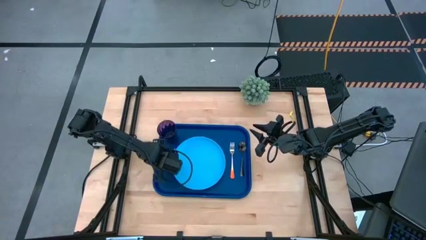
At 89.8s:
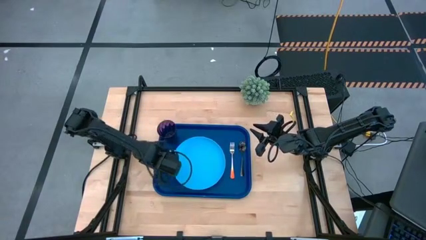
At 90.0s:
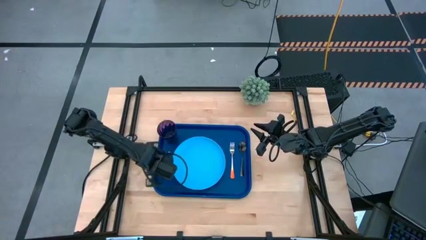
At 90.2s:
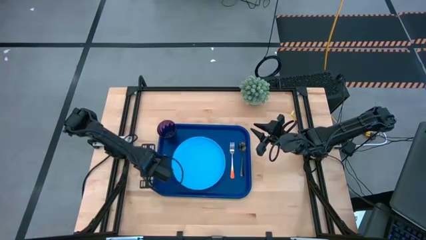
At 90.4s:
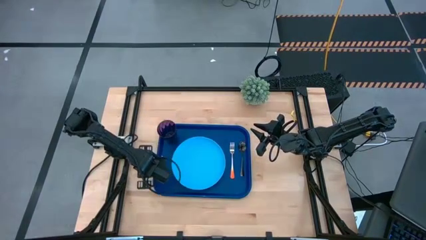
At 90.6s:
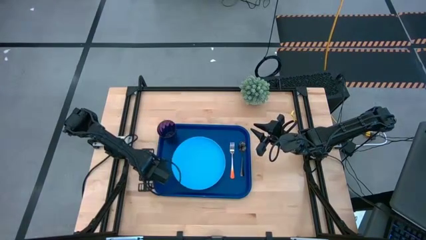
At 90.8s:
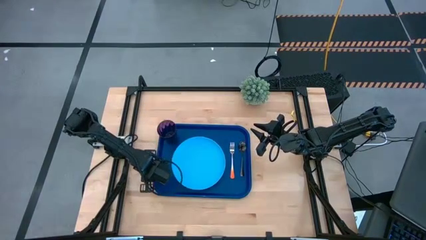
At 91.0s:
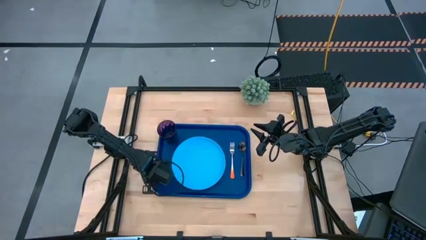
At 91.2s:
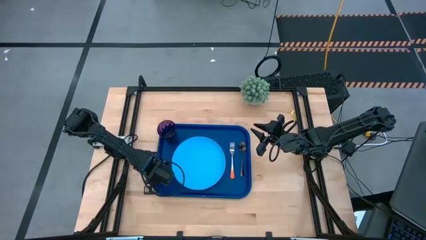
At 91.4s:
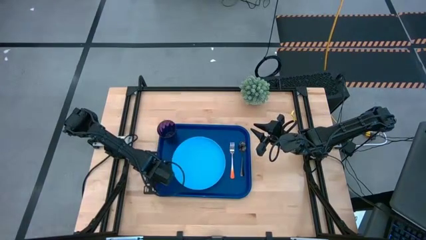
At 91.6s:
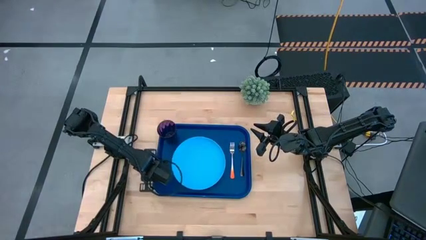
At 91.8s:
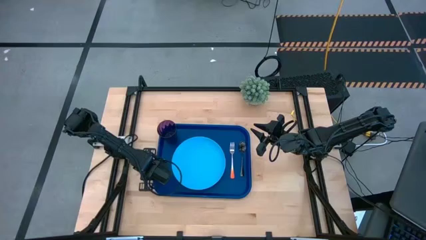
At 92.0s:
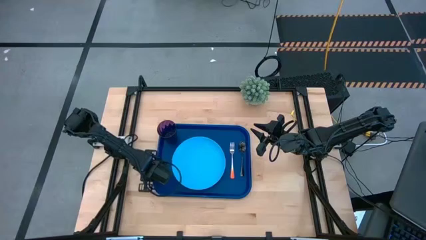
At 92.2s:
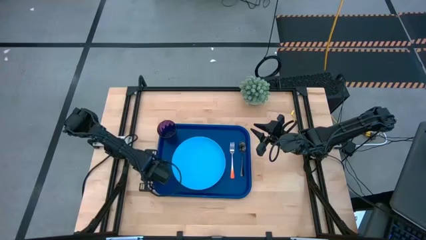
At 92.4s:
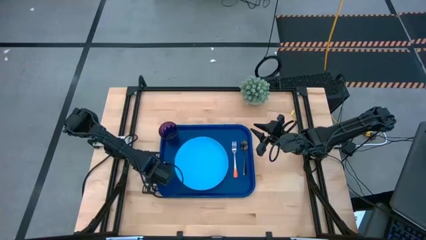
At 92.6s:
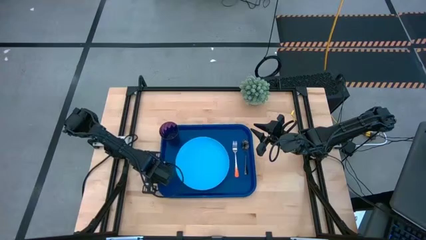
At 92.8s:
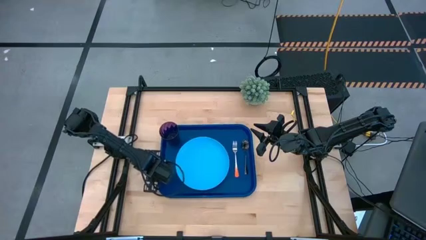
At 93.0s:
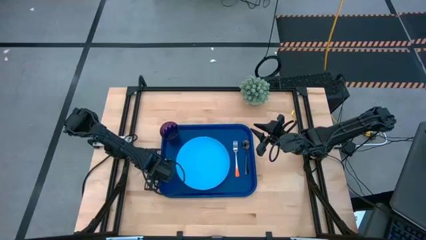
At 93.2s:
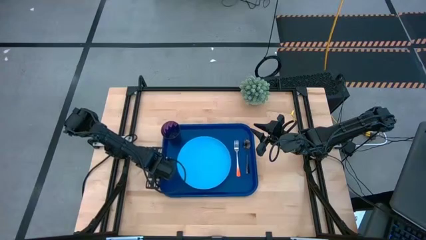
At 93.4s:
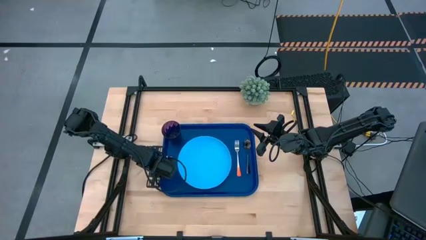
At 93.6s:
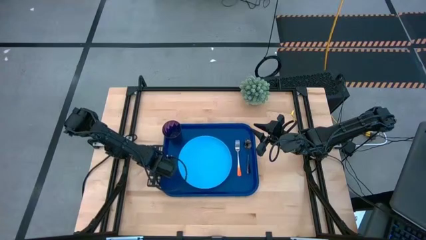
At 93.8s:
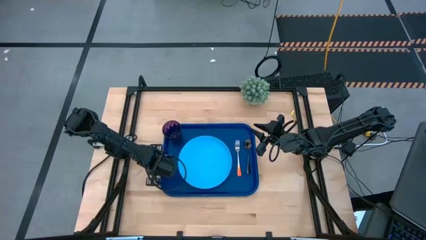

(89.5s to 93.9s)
Task: Pick and place plate/cup/fork/spoon on tray
Adjust the dark blue tray

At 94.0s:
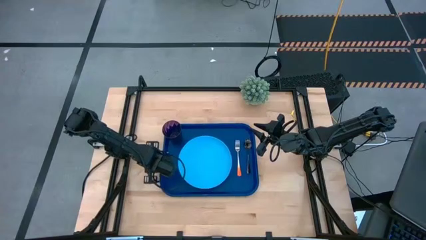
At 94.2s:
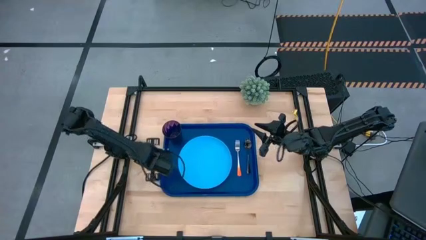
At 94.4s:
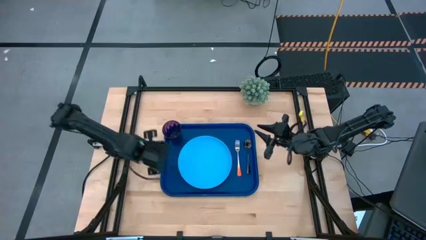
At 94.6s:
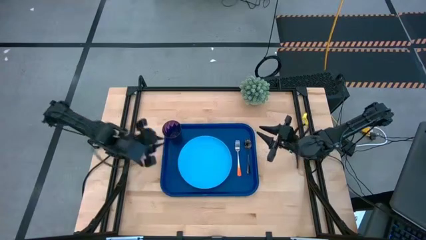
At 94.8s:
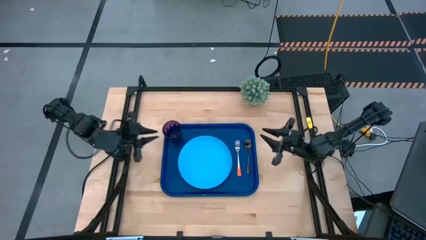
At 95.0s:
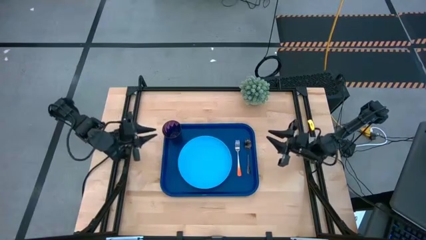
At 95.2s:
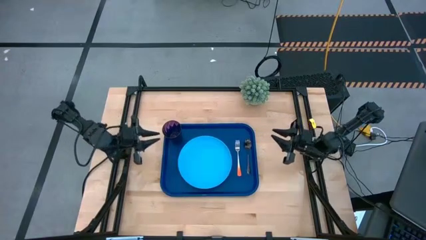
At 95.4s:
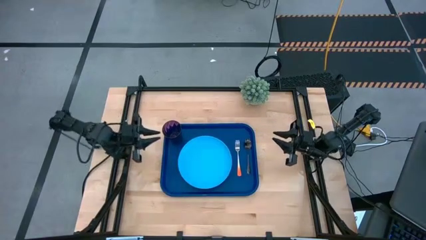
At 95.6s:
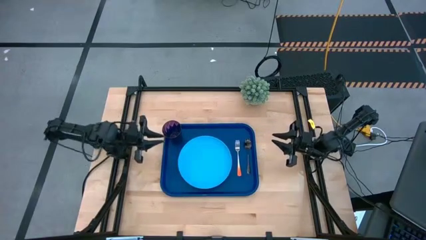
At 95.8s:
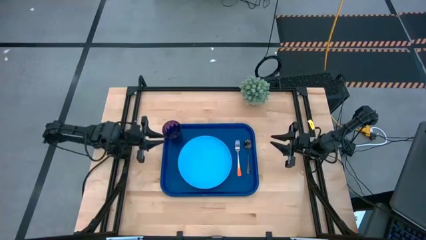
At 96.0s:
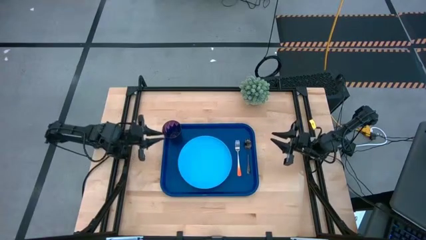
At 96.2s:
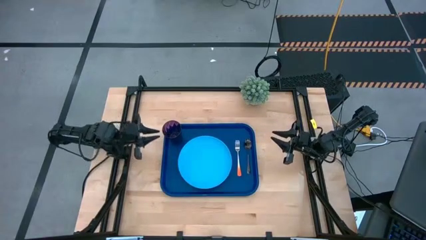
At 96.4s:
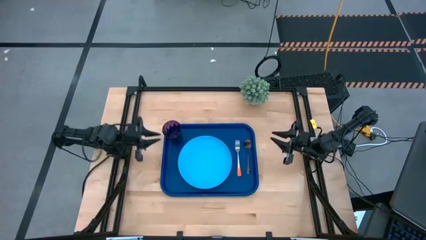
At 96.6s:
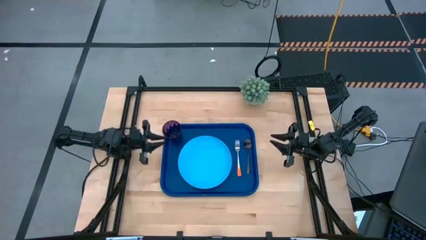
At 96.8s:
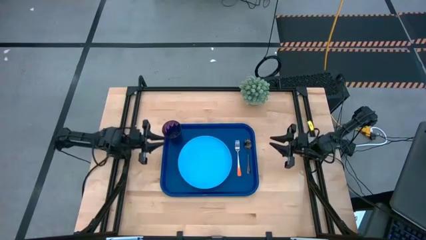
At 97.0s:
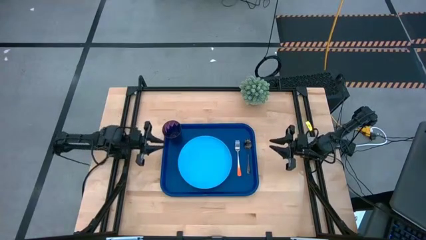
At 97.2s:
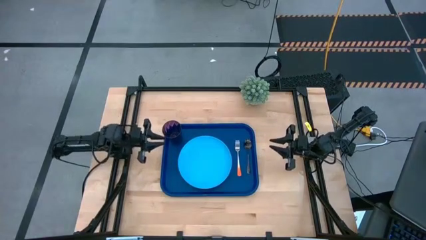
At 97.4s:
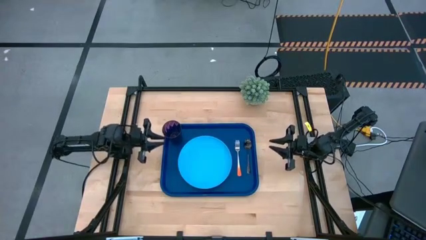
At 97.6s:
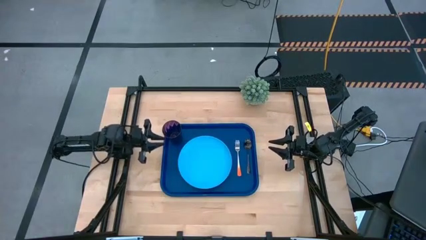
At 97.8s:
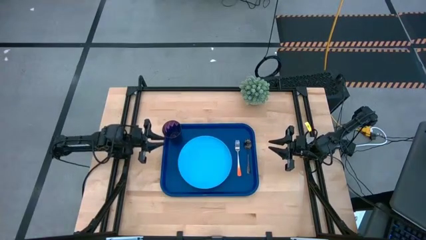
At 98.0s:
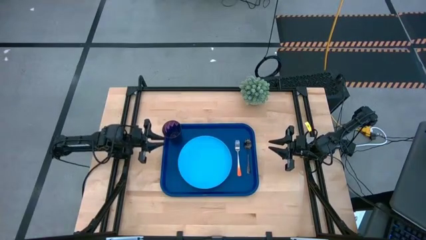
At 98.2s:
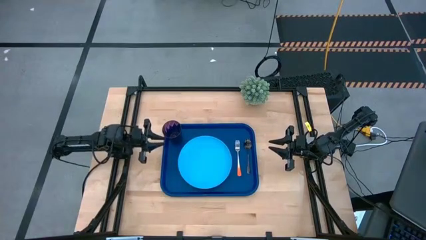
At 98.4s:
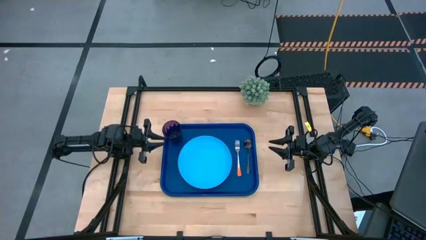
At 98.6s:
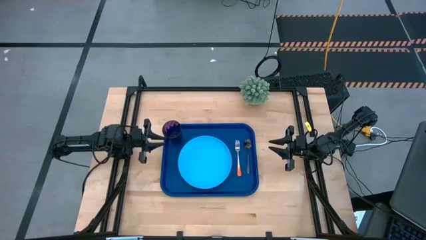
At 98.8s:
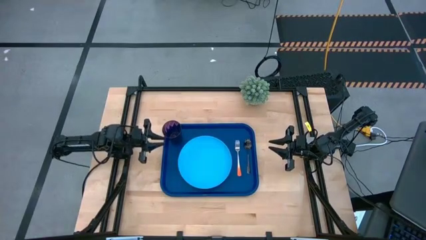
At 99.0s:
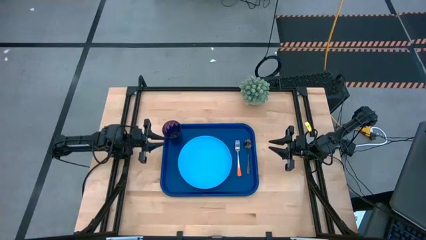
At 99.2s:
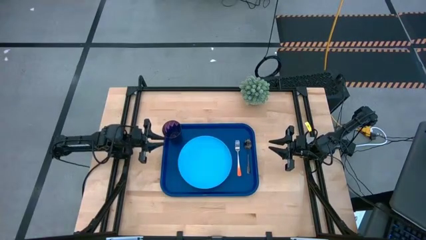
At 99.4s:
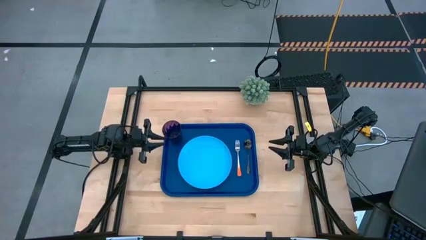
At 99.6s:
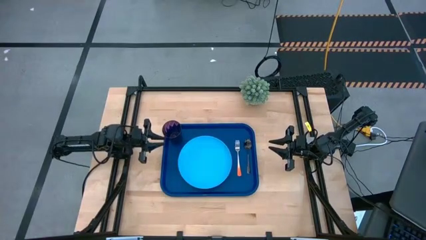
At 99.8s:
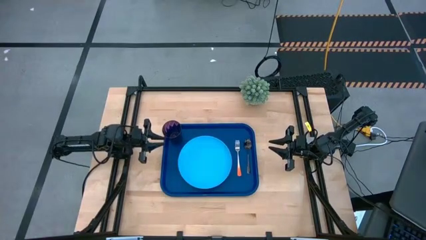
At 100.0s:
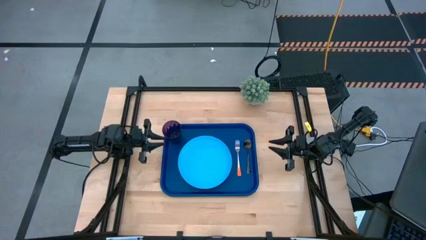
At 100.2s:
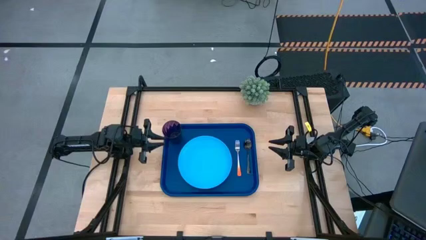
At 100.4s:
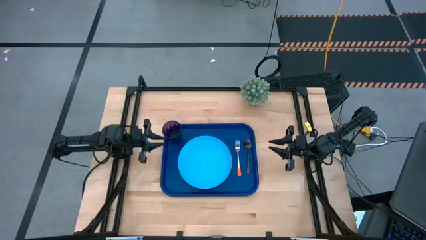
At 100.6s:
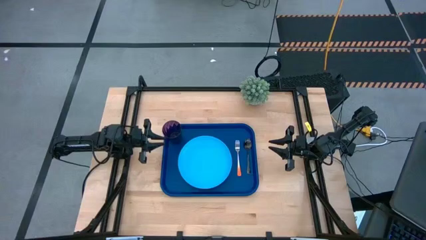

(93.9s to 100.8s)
Return to Home Position

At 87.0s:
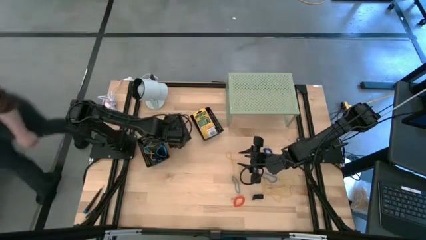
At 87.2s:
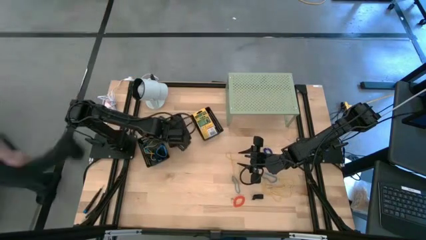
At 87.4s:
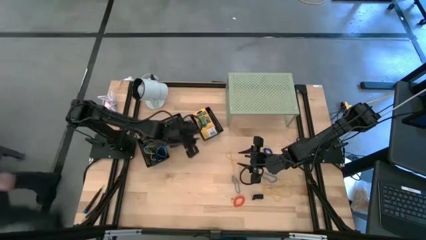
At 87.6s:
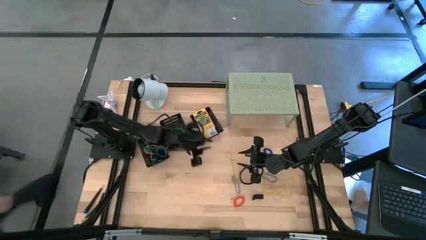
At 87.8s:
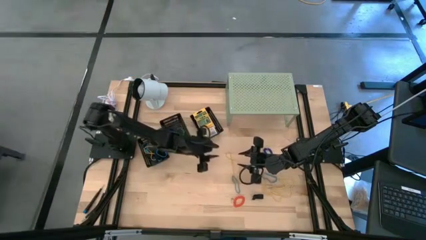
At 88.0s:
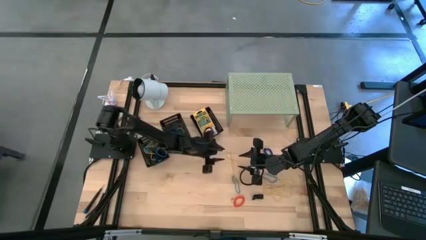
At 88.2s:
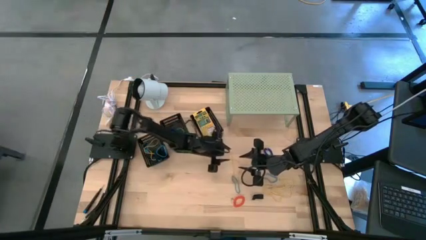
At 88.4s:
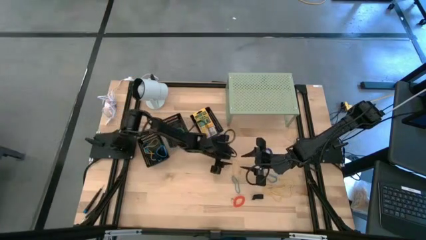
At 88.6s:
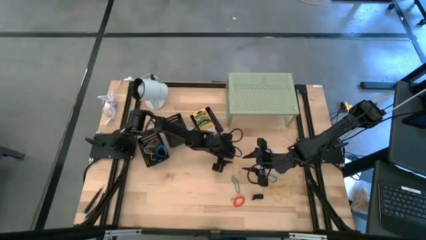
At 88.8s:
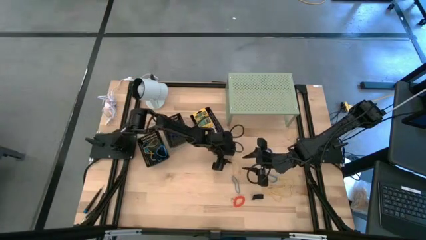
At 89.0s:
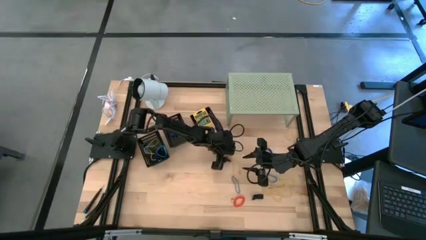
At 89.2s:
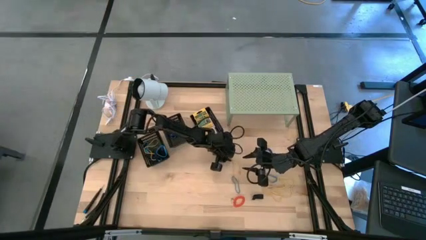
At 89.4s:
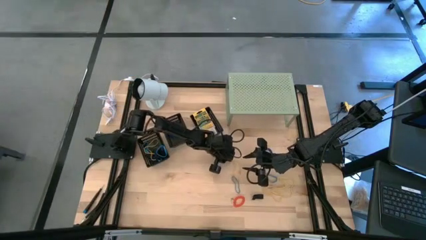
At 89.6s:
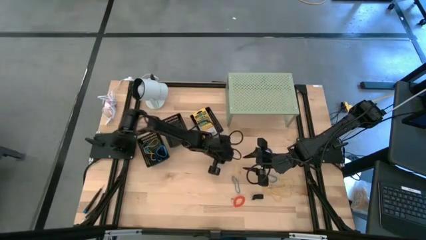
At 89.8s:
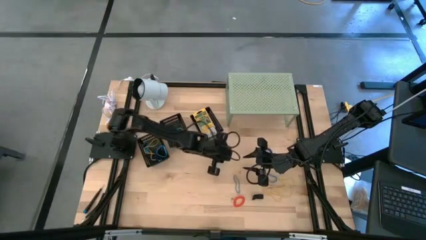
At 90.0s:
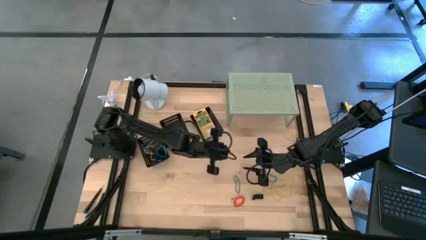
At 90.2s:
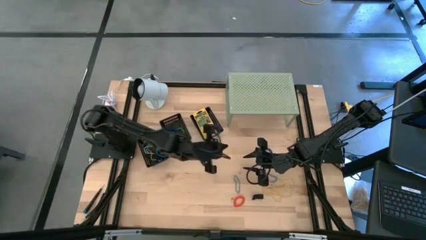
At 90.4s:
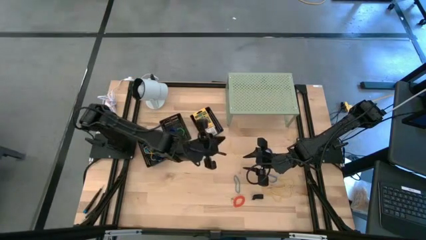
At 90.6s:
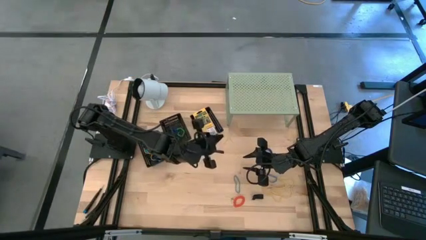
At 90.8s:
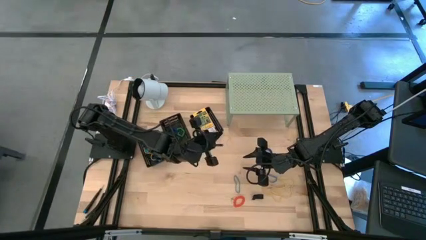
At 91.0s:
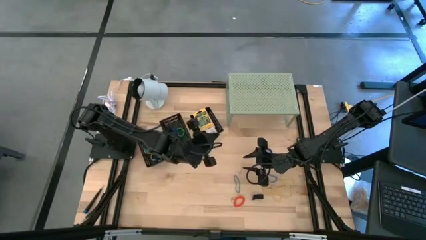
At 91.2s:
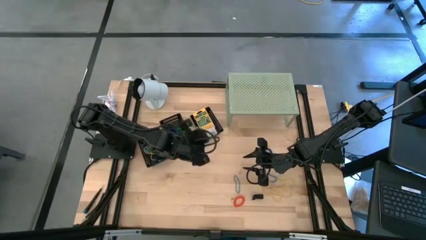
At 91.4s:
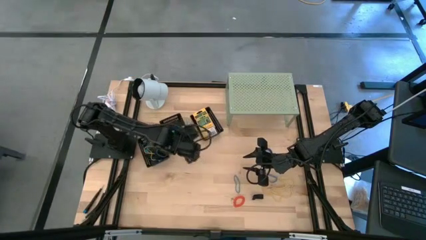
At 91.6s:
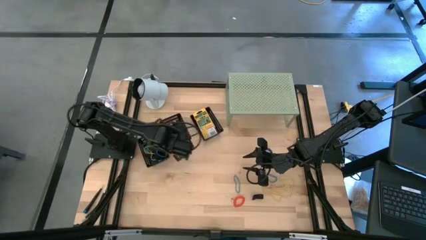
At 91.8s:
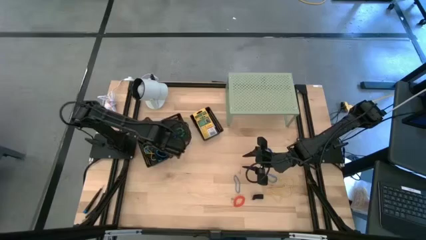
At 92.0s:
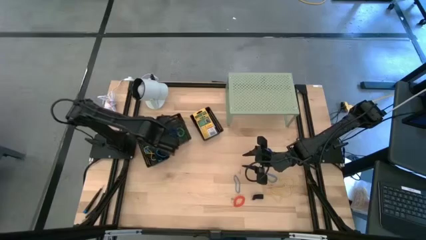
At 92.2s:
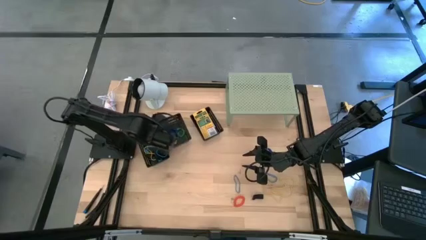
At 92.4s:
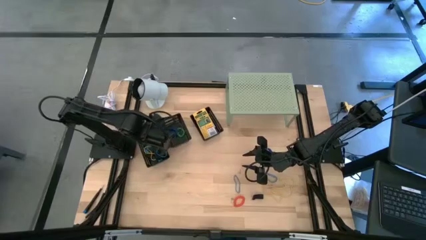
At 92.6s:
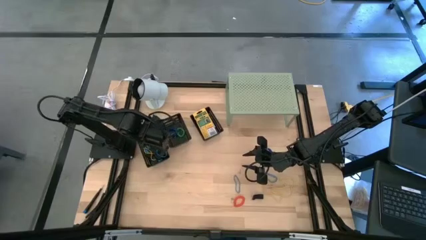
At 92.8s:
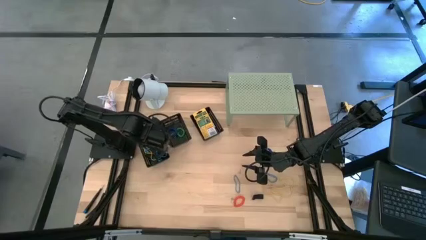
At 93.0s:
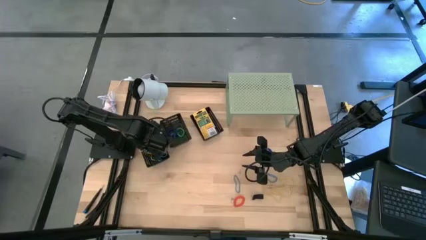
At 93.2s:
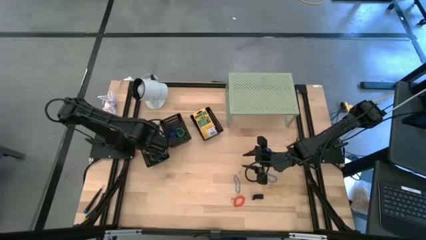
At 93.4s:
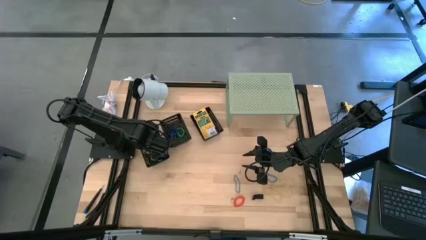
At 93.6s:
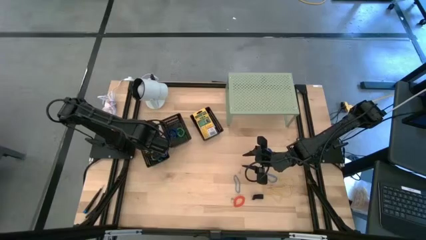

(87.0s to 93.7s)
Task: Pick & Place Office Desk Supplies
Put the yellow rubber band into the left black basket
